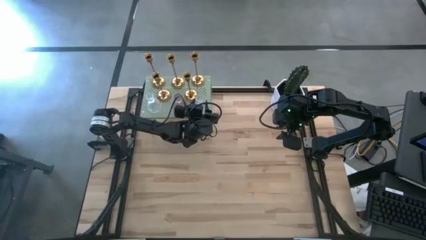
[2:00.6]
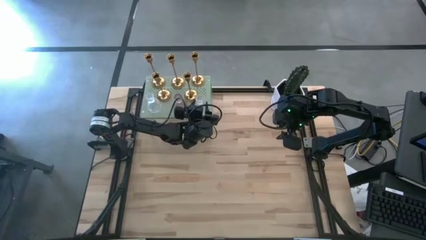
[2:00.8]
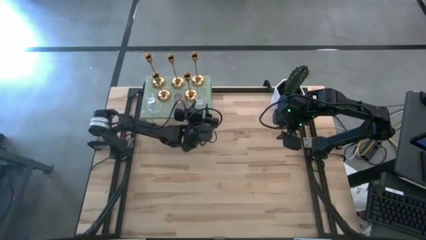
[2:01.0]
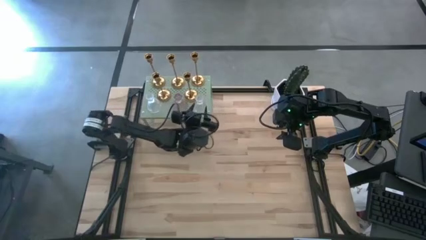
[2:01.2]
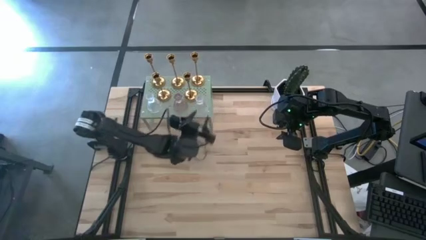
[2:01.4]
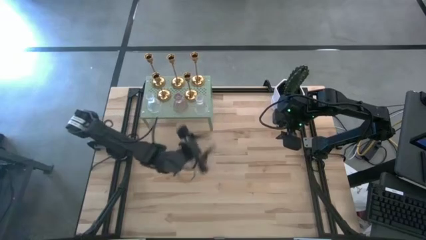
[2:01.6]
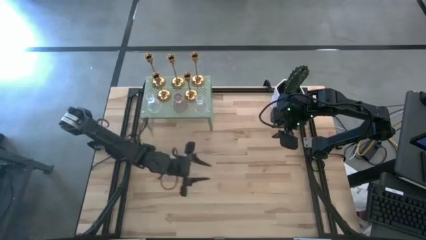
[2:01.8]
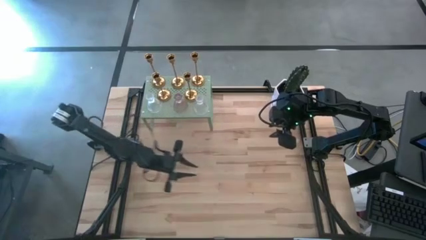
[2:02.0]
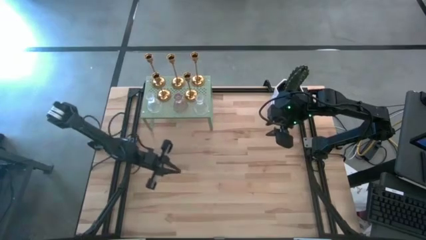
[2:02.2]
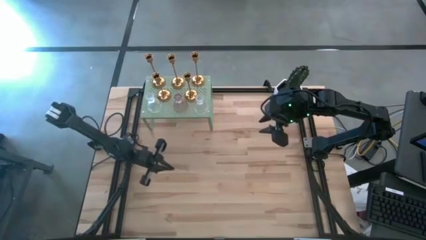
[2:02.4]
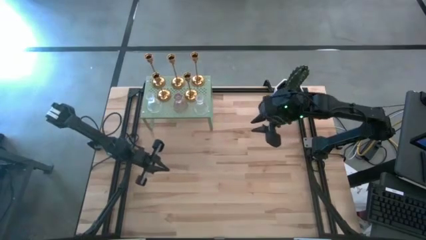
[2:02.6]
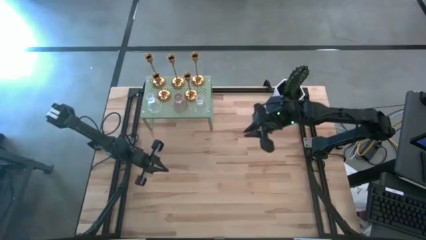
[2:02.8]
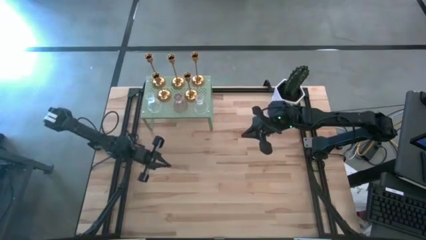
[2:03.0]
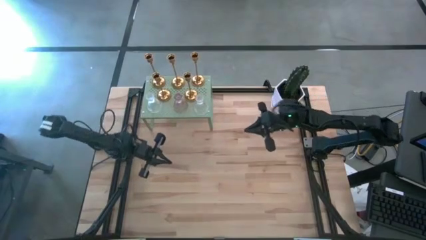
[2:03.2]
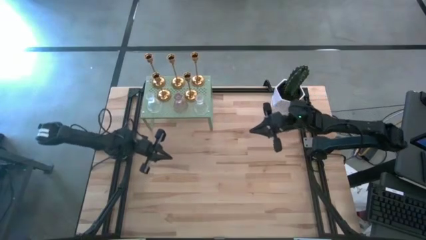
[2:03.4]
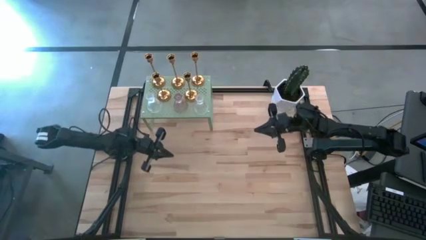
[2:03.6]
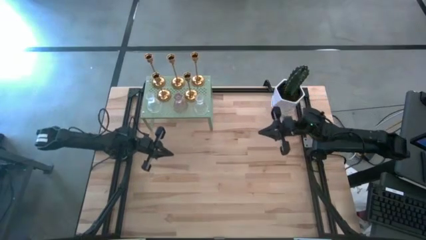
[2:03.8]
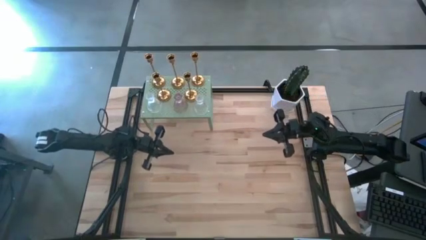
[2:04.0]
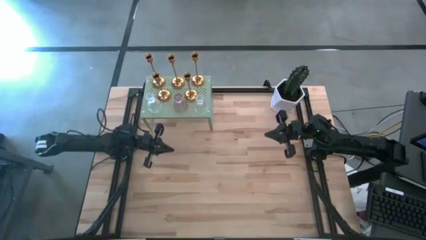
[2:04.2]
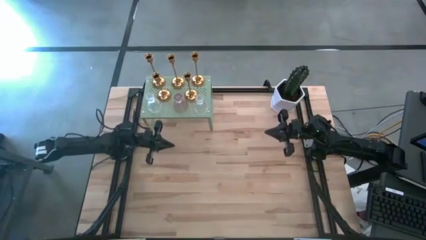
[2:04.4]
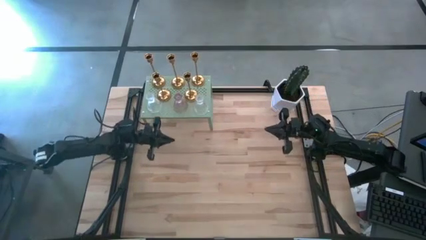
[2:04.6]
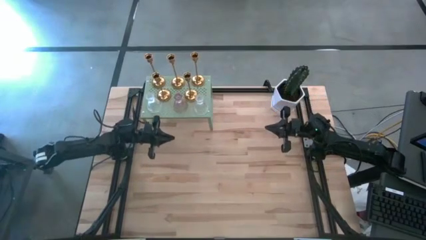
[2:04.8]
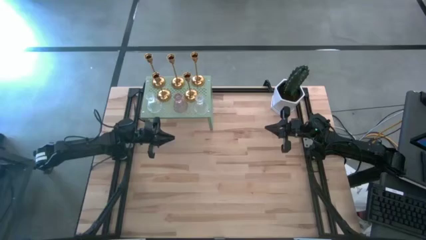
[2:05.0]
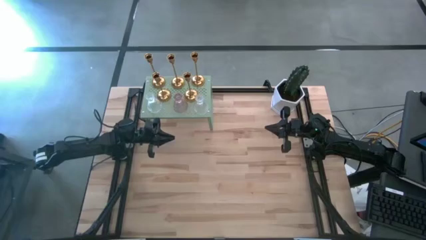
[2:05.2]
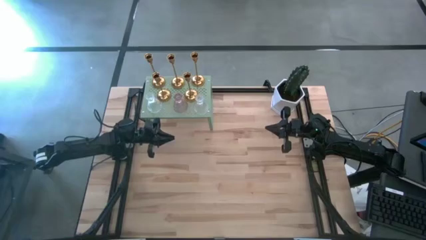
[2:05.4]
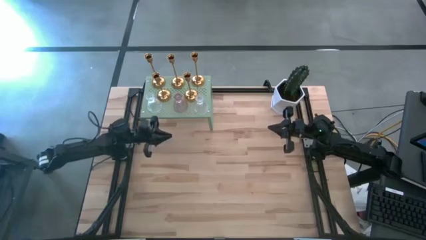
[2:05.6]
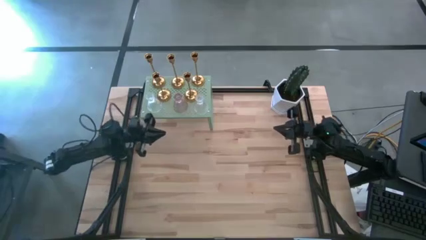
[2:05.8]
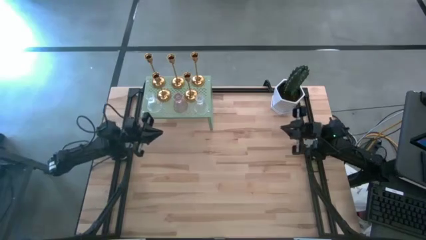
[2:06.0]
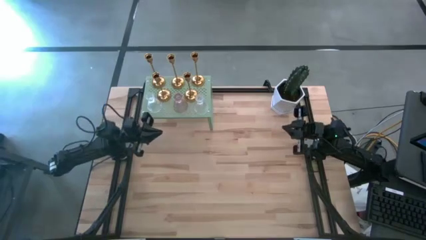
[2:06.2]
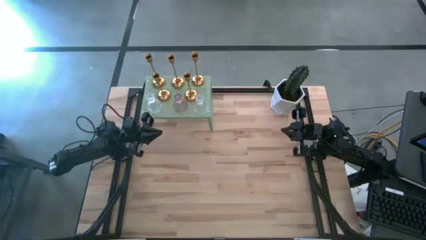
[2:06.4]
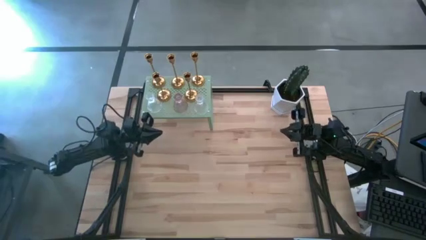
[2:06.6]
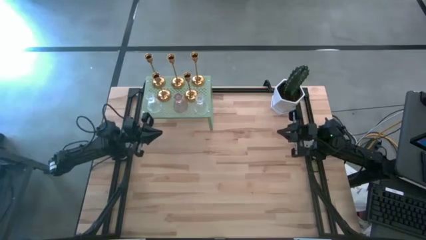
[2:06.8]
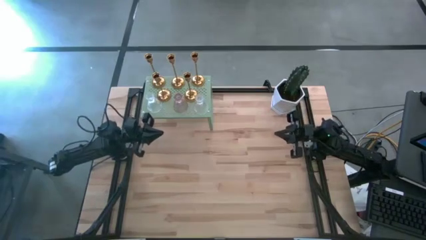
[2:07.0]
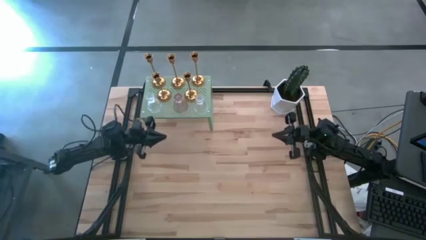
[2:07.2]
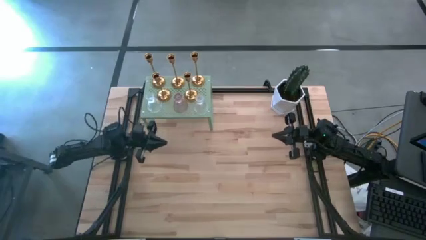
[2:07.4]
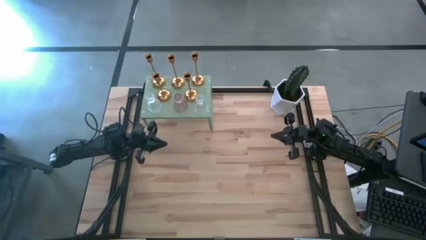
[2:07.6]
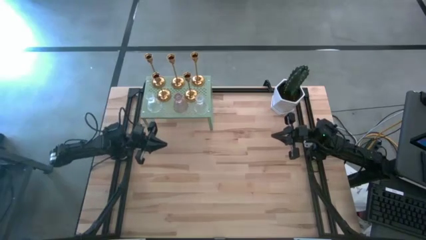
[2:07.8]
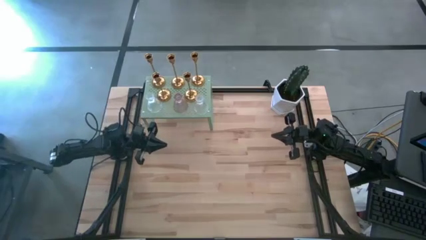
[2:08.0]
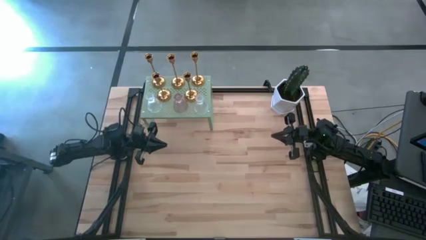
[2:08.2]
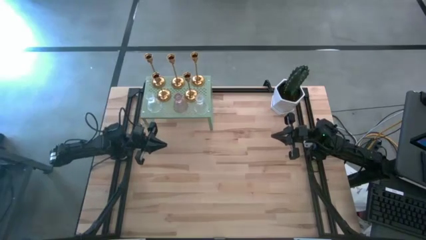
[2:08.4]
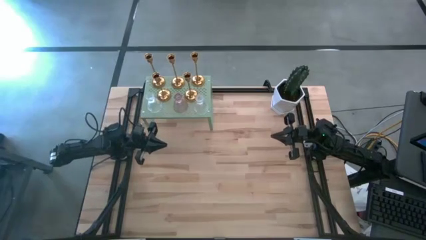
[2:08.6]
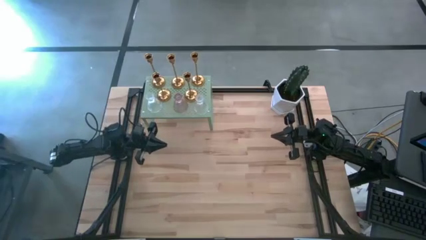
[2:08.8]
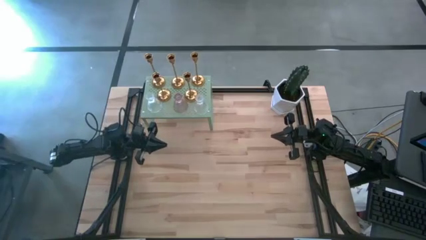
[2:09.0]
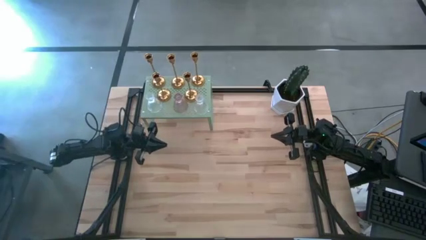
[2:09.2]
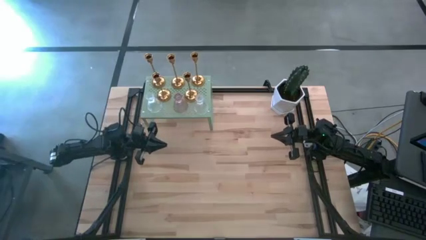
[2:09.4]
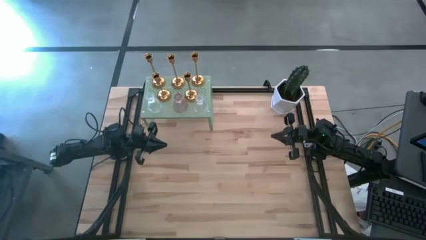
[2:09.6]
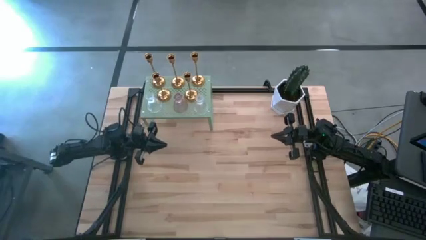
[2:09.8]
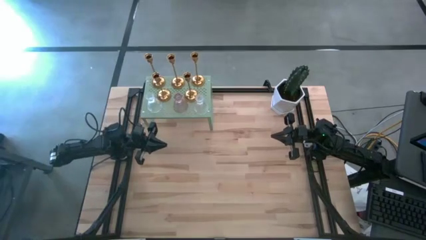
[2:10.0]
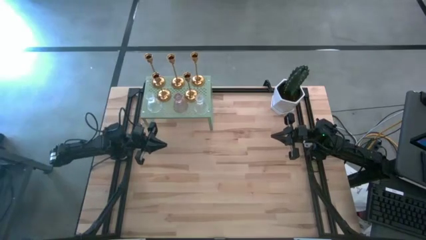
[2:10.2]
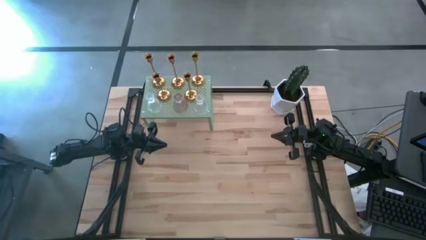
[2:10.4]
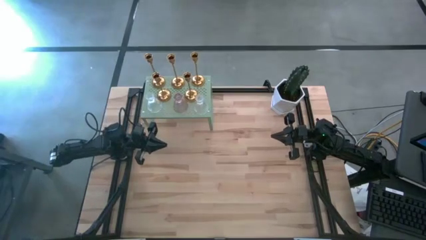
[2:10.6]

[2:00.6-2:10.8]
Task: Pick & Place candle stick holders
Return to Home Position
